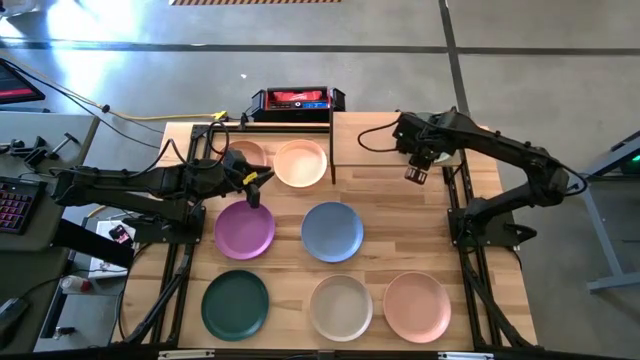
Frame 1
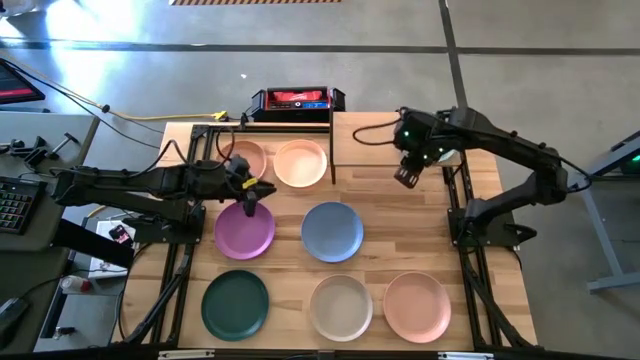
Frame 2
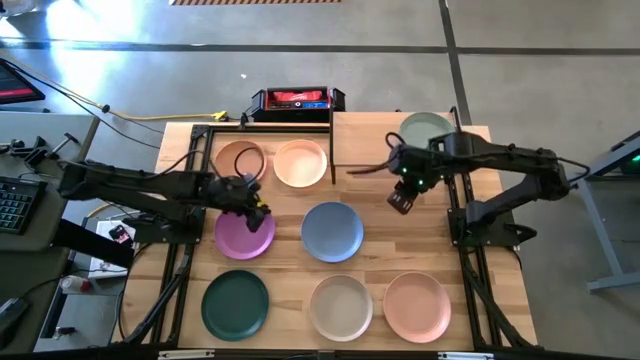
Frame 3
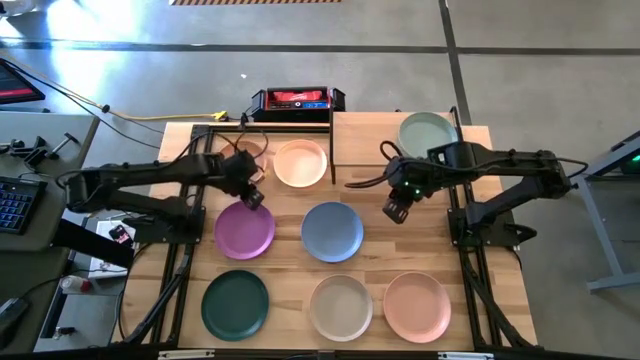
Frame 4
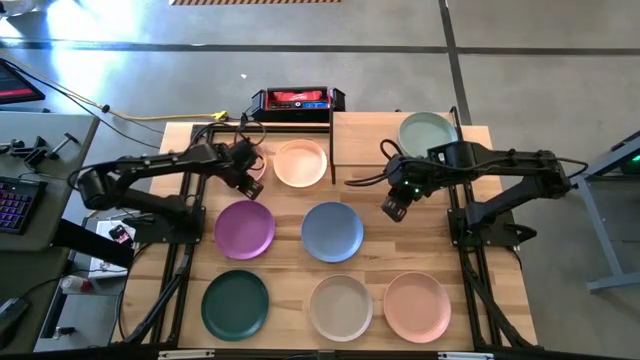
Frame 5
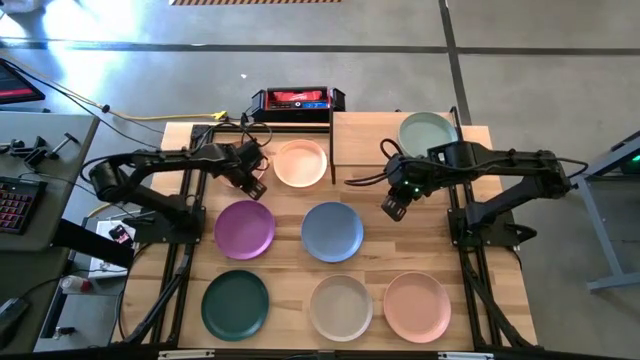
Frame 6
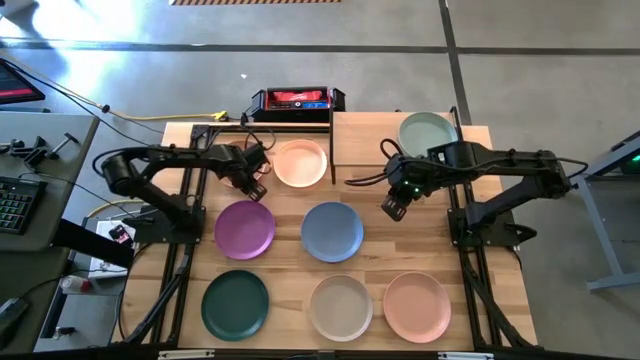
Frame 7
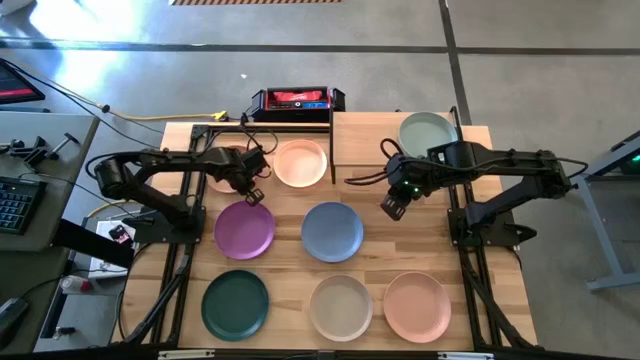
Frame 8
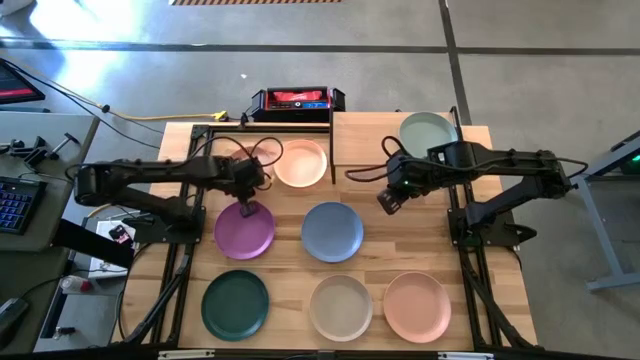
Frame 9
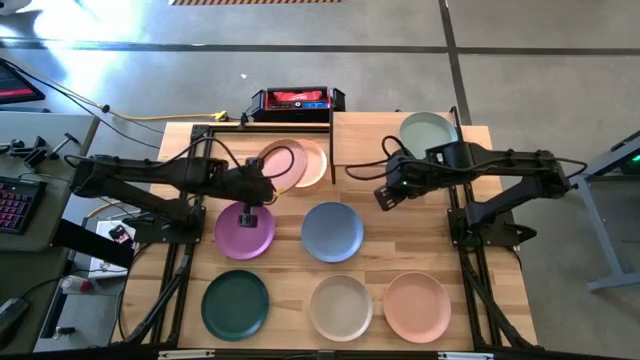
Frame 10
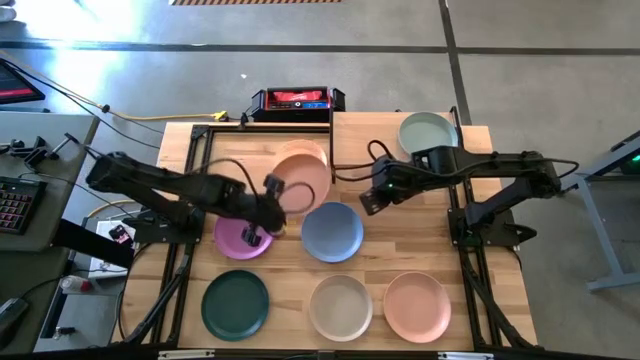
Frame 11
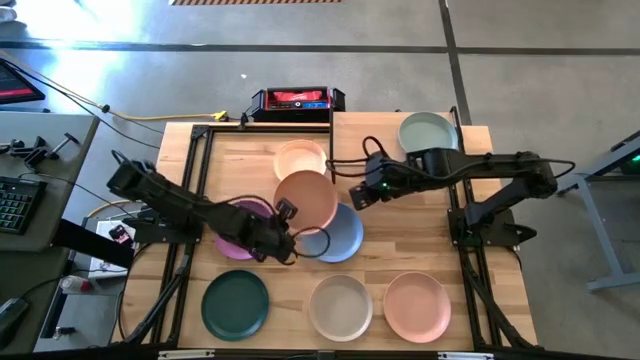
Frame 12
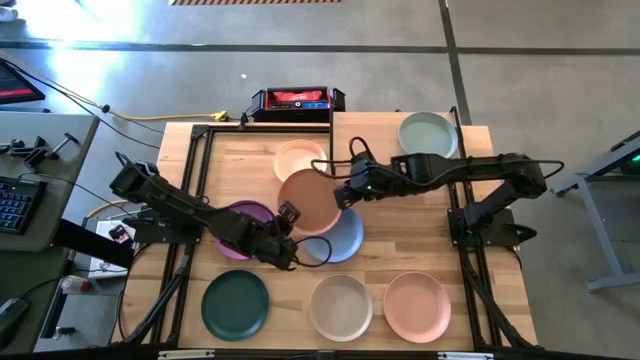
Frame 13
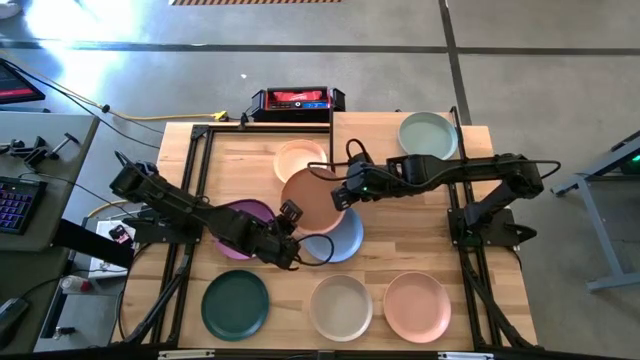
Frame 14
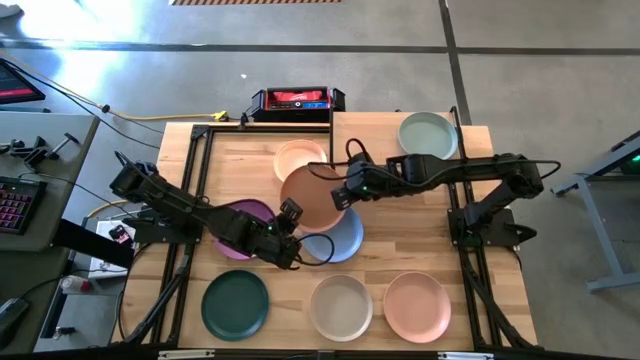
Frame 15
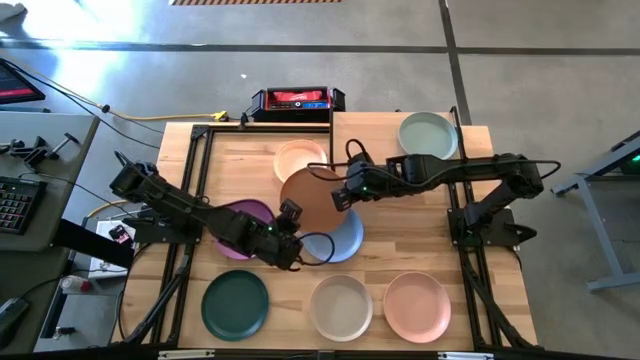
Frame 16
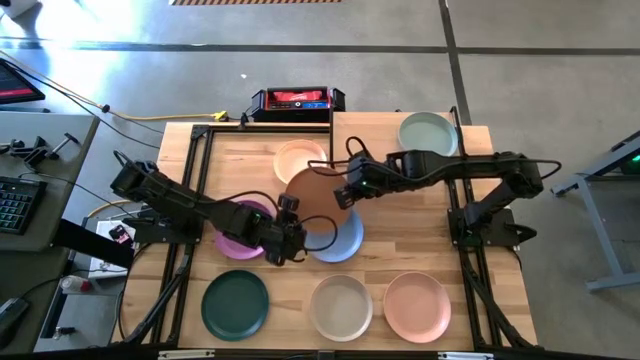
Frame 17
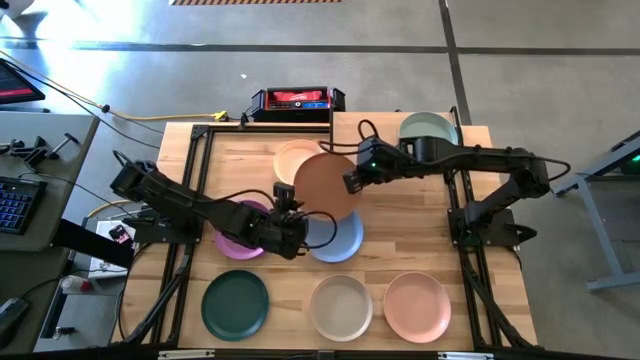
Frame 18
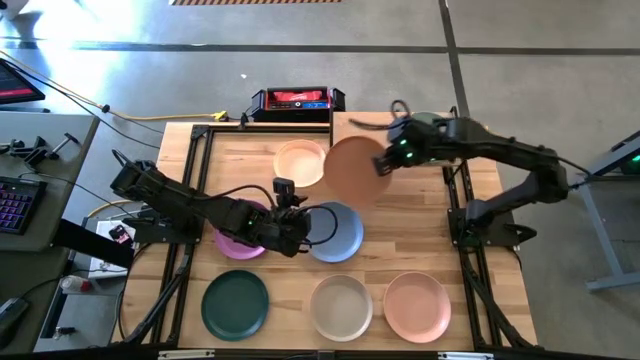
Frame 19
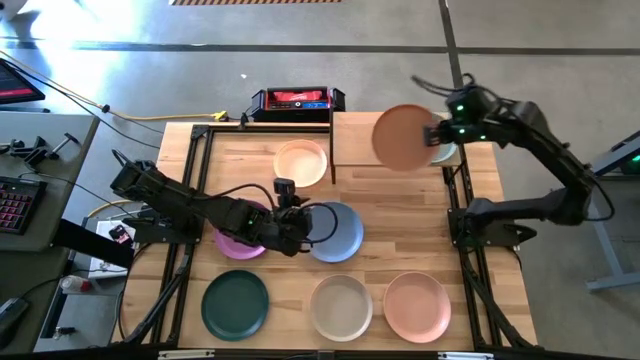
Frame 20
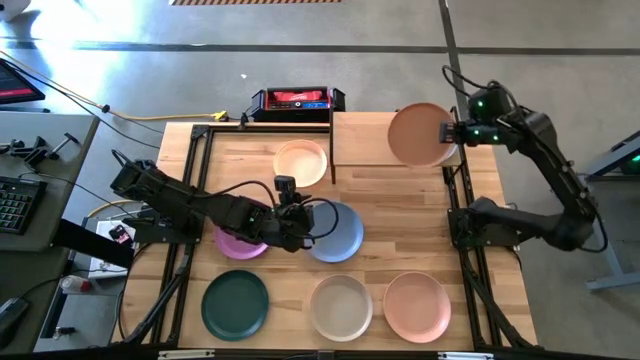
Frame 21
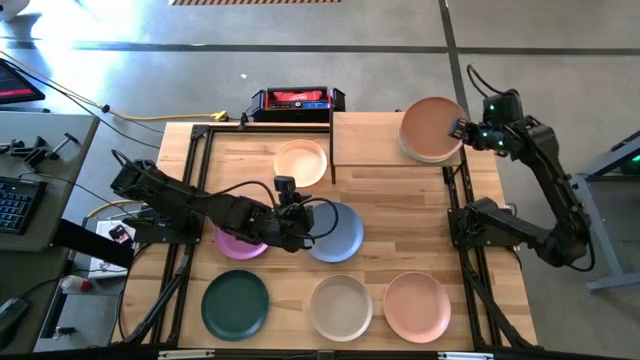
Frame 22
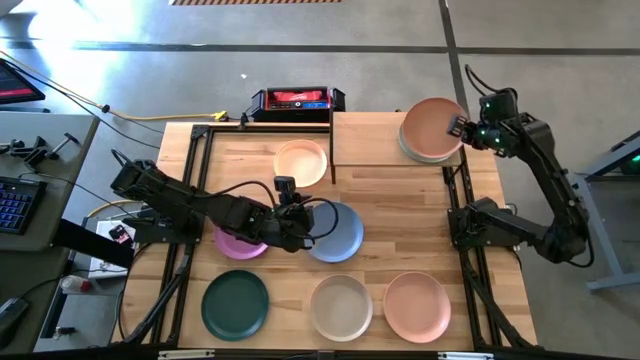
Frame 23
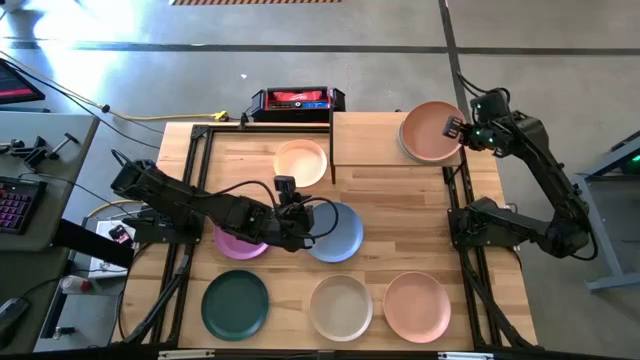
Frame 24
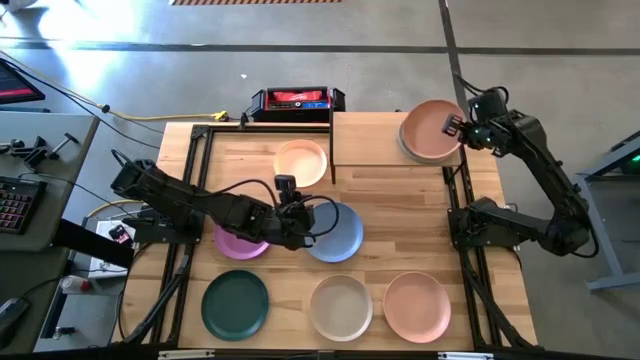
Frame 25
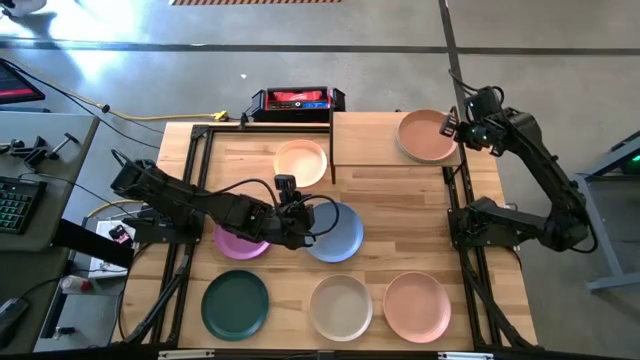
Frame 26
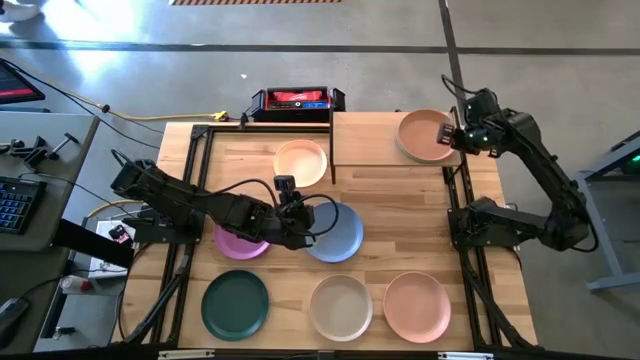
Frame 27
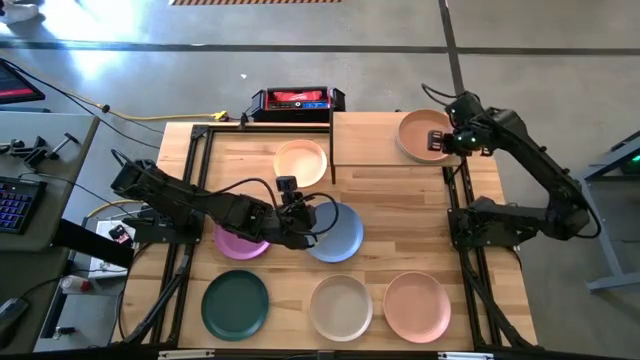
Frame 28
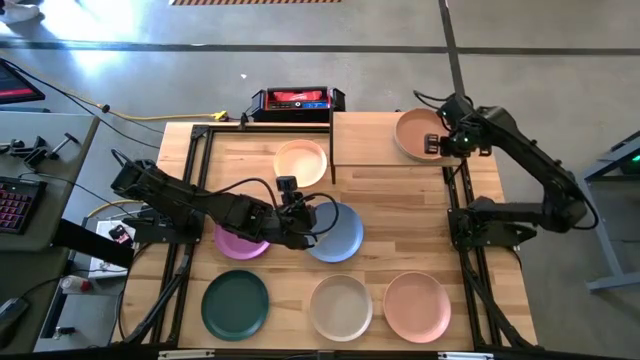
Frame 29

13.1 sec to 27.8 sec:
Task: Place and stack plates onto a shelf
Stack the orange plate on top of the light blue plate on the shelf

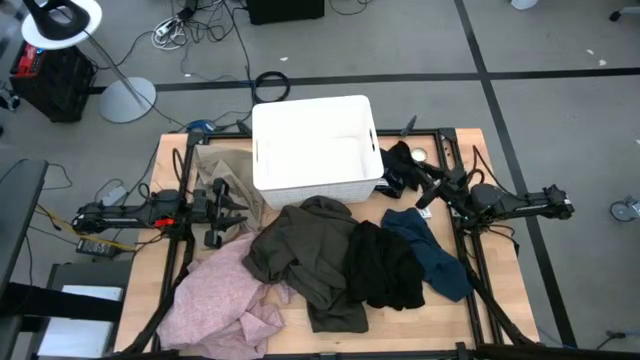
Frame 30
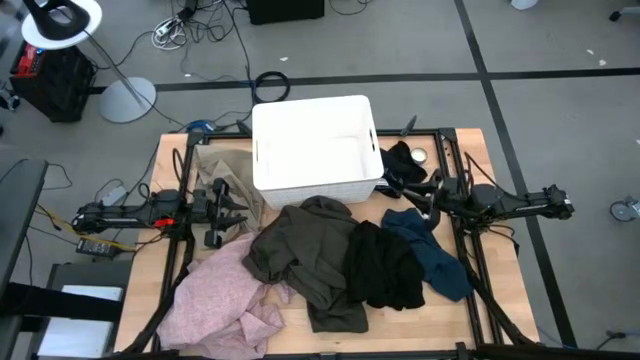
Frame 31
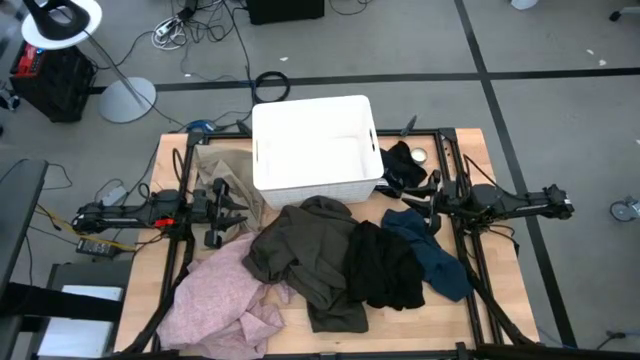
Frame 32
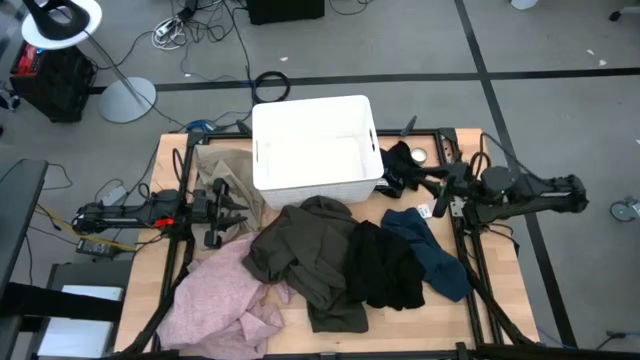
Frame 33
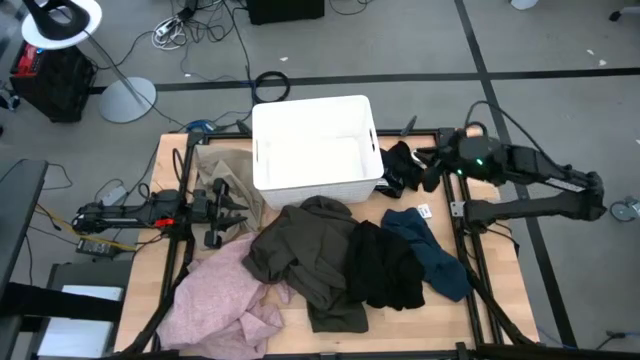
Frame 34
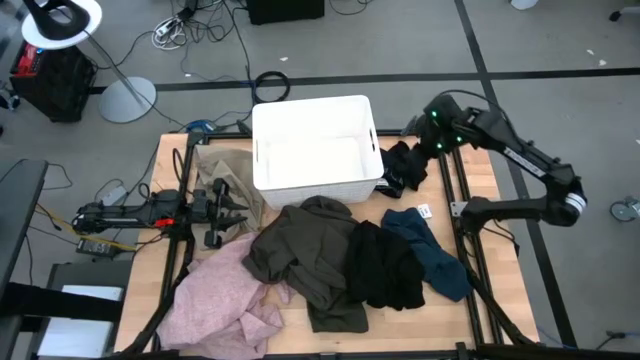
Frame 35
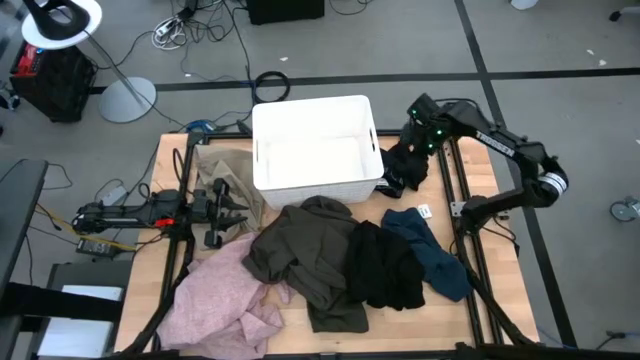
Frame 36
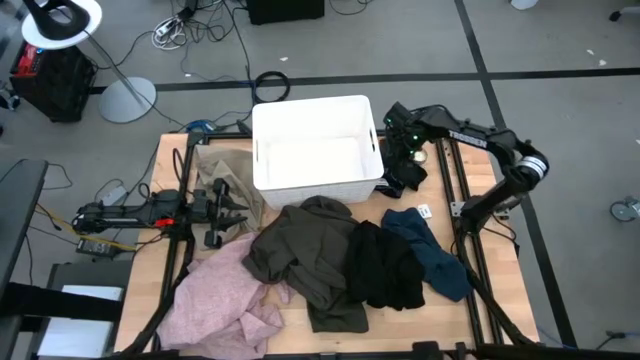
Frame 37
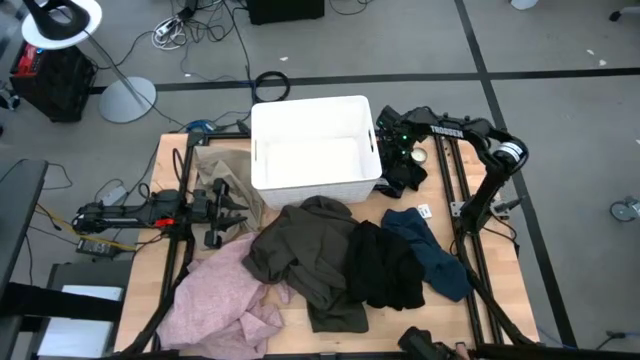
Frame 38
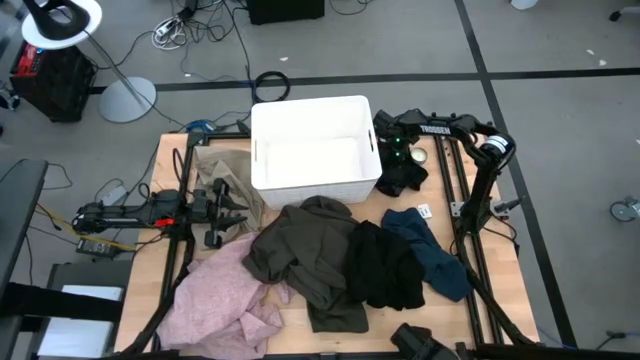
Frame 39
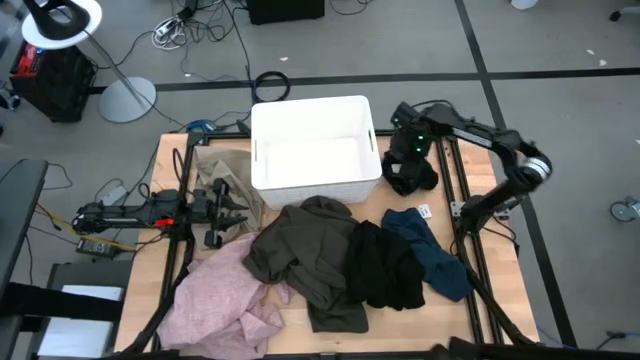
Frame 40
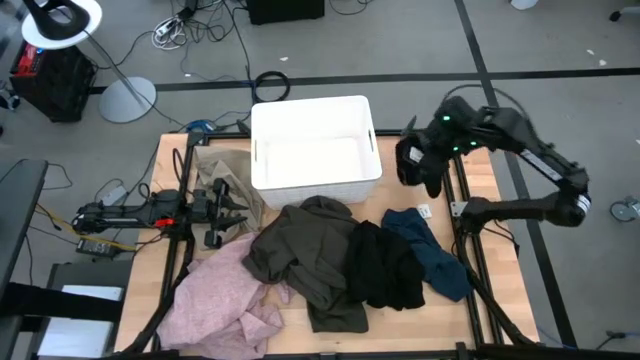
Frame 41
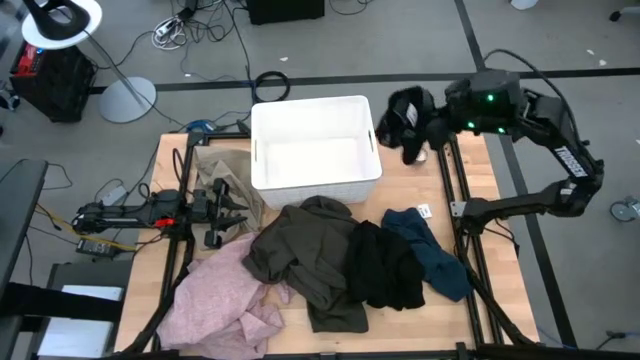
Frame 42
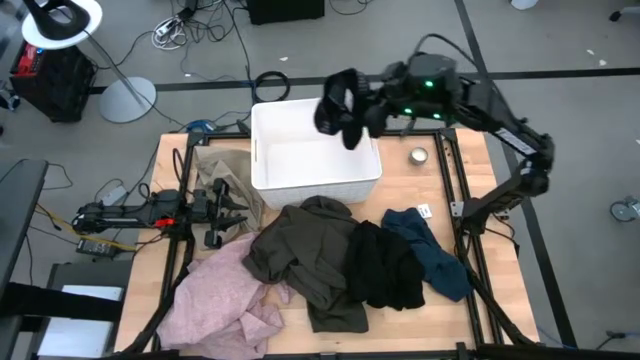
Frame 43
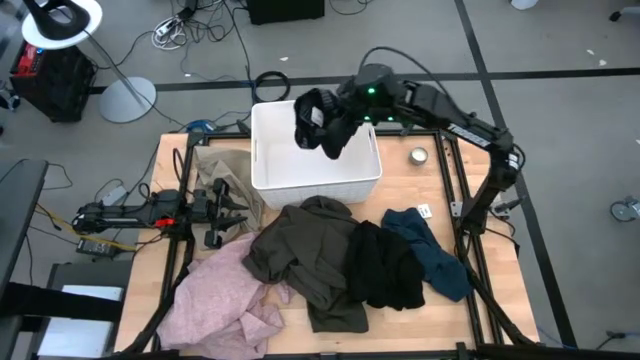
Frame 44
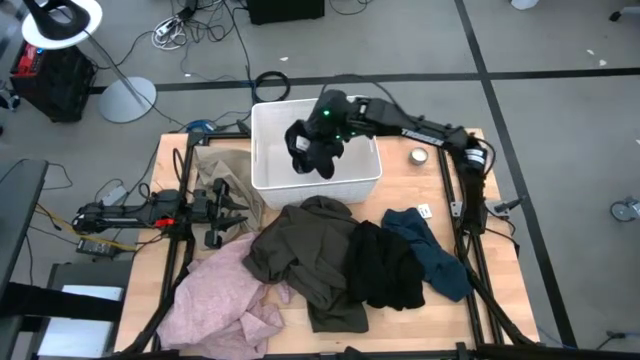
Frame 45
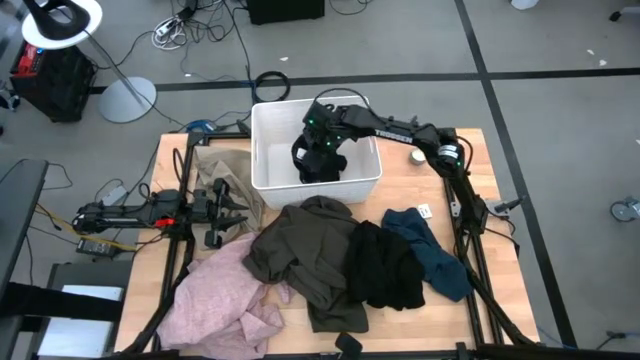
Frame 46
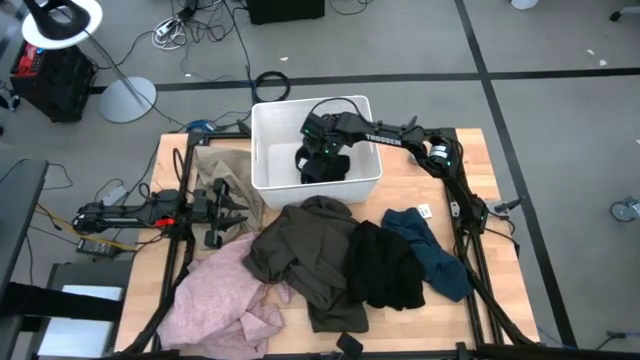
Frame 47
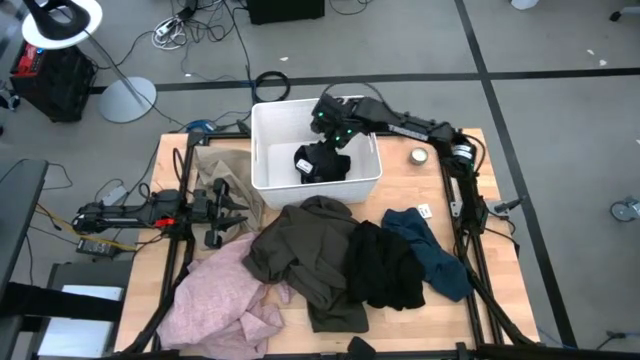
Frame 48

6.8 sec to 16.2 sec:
Task: Sort clothes
Put the black underwear into the white laundry bin
